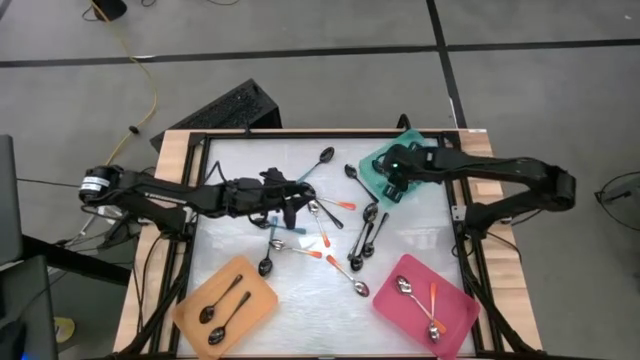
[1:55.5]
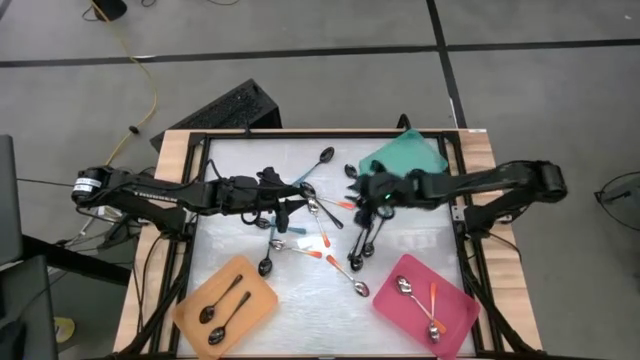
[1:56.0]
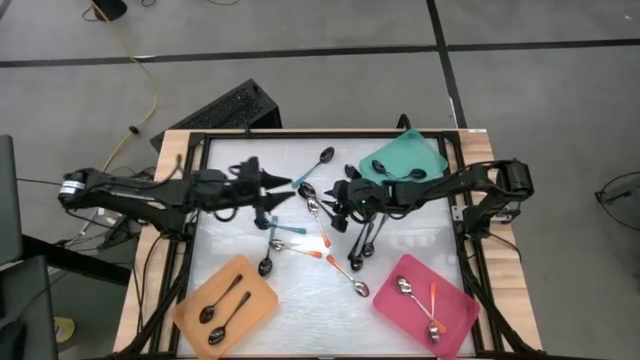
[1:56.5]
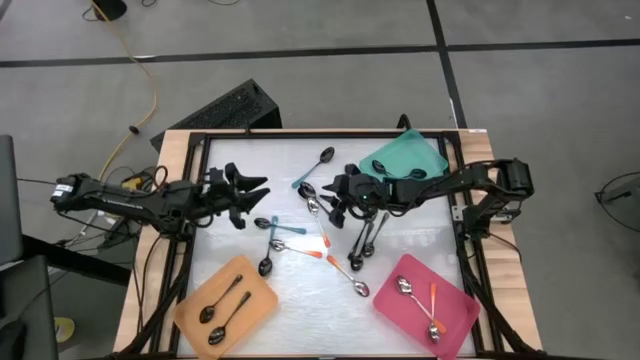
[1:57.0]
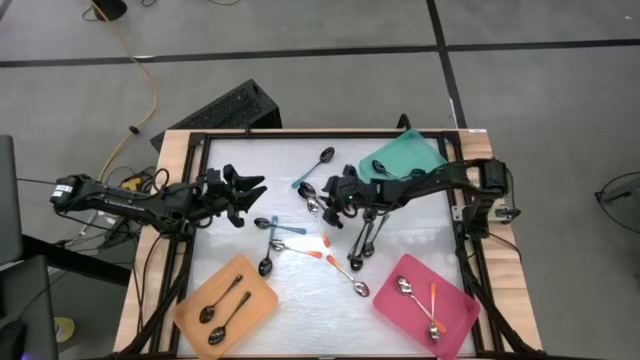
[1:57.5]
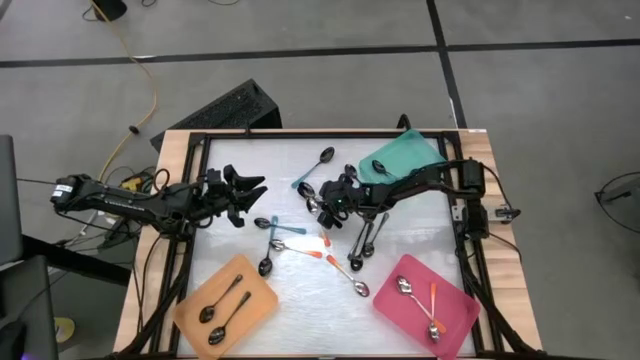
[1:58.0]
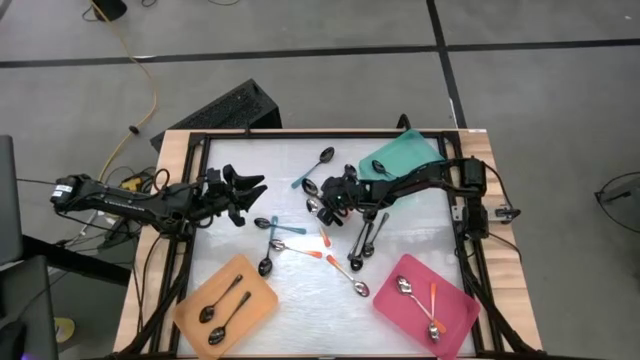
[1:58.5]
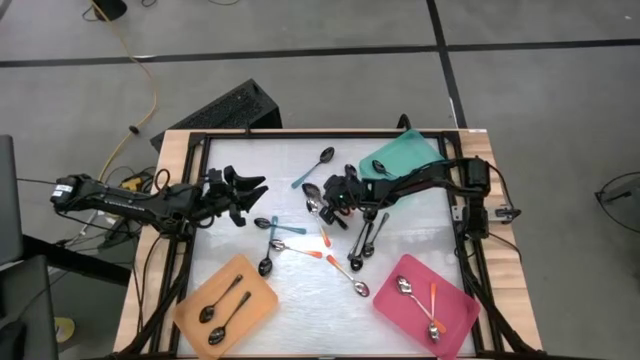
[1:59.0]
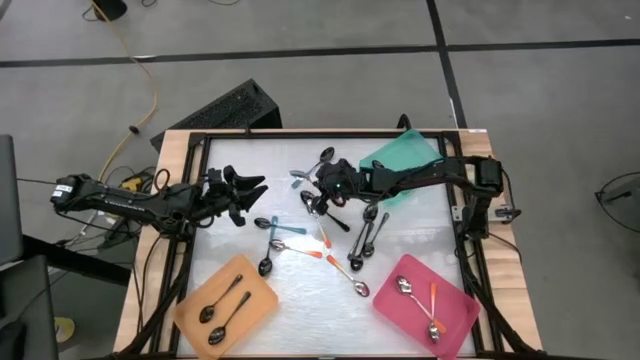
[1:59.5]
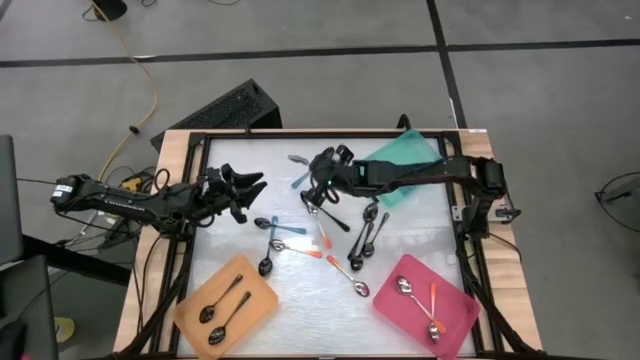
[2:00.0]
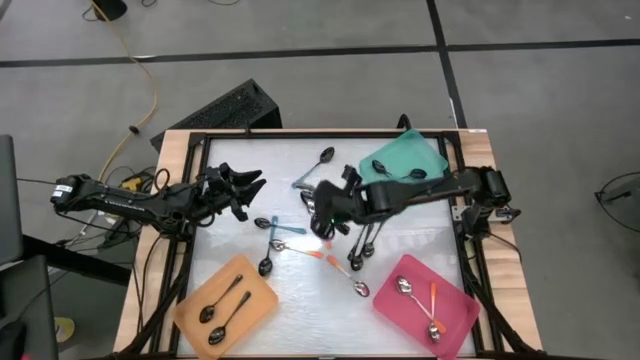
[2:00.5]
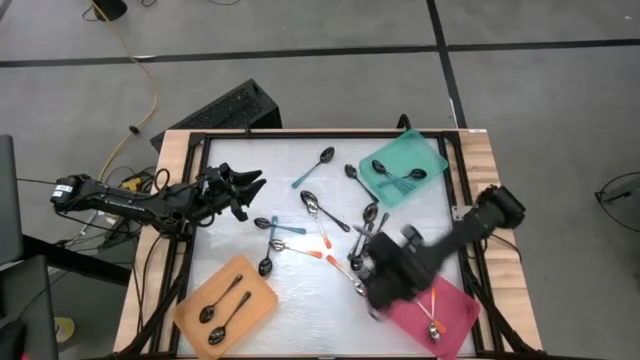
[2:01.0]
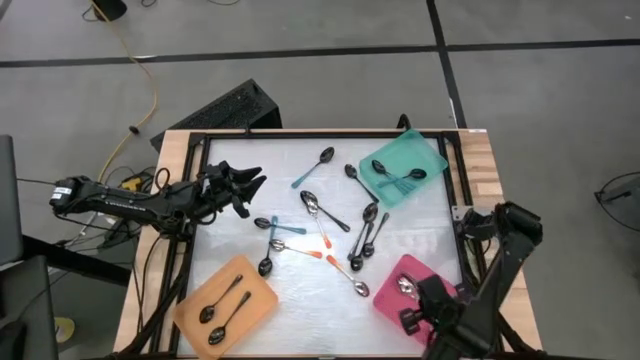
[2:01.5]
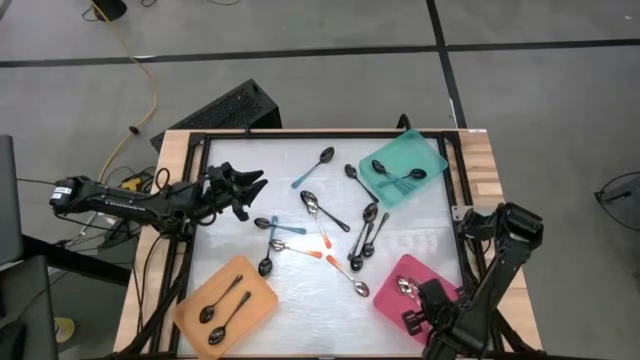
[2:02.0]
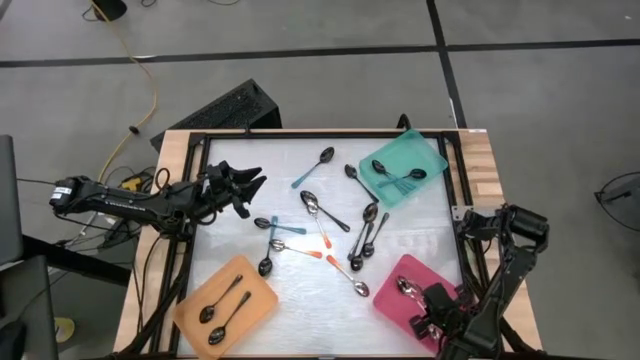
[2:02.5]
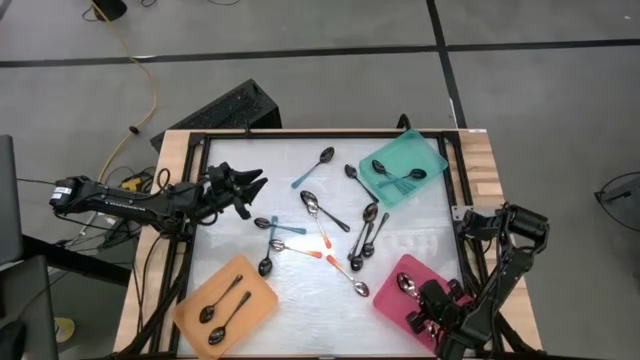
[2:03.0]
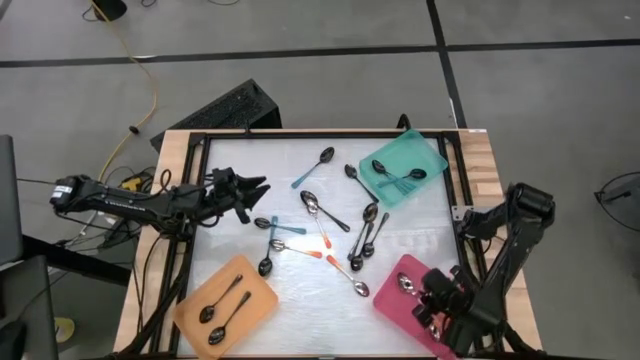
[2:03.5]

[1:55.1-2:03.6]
Task: Sort silverware by color (type)
Put the orange spoon into the red bin

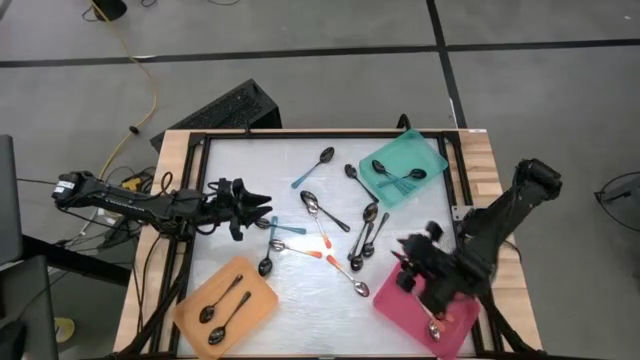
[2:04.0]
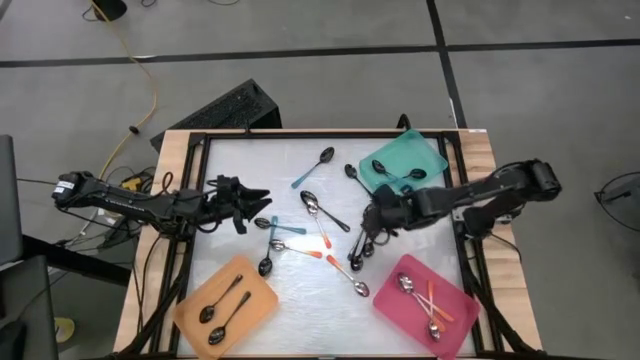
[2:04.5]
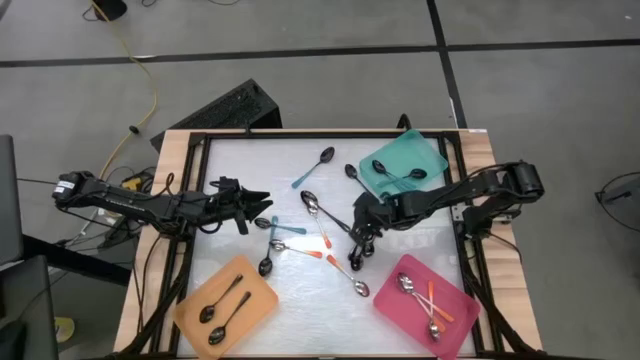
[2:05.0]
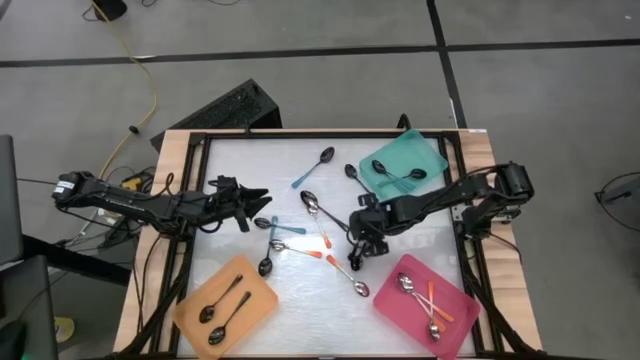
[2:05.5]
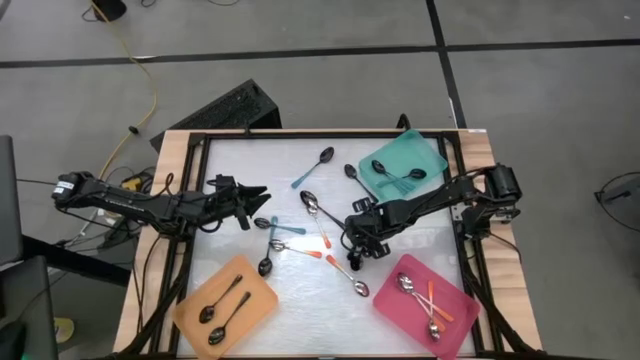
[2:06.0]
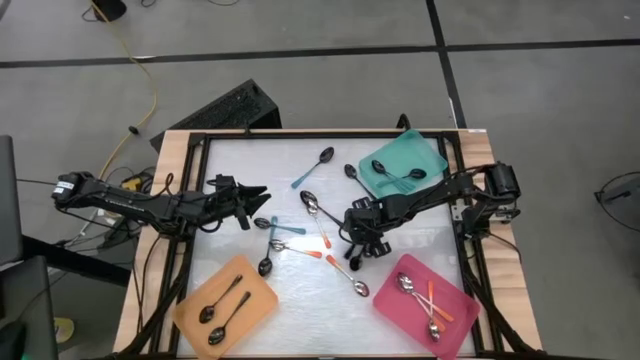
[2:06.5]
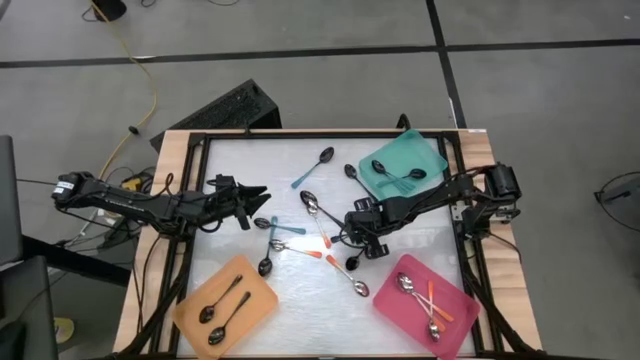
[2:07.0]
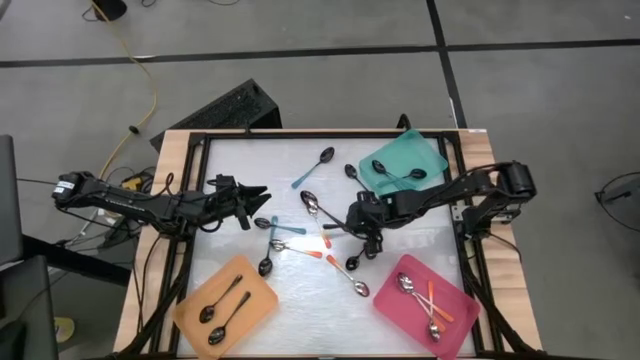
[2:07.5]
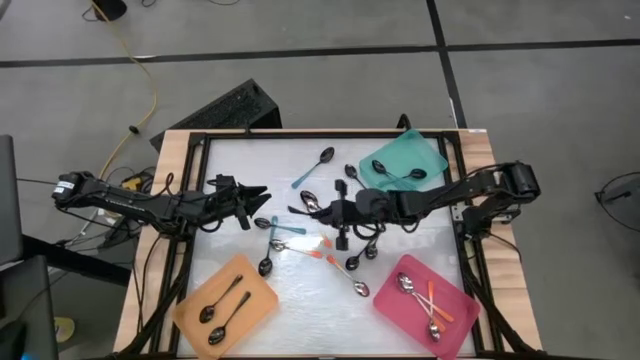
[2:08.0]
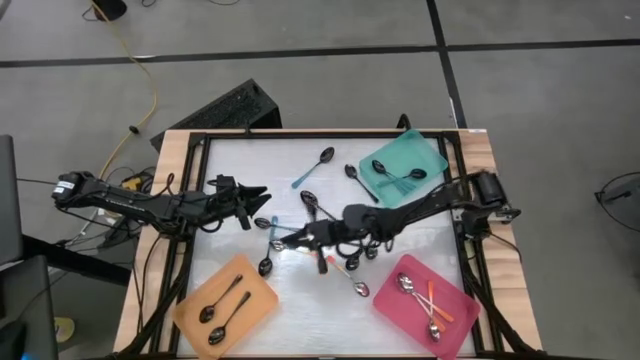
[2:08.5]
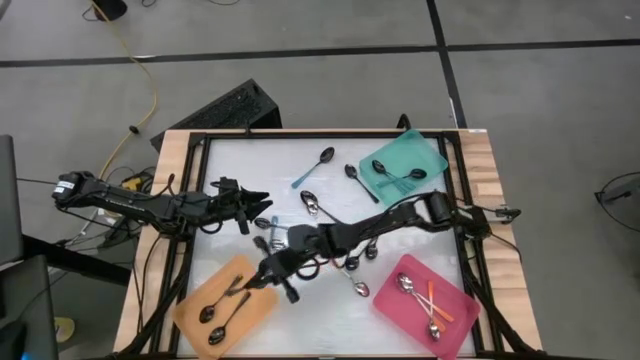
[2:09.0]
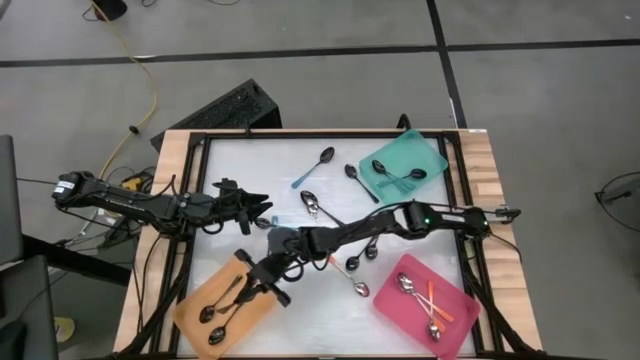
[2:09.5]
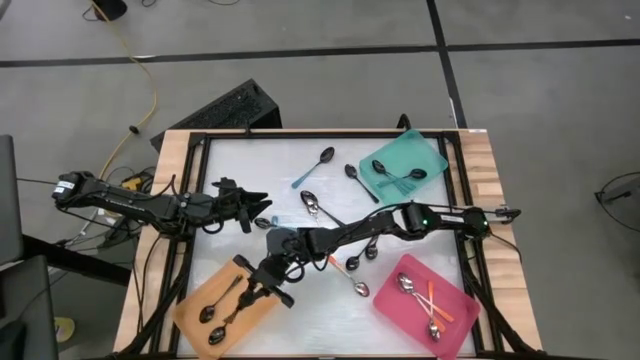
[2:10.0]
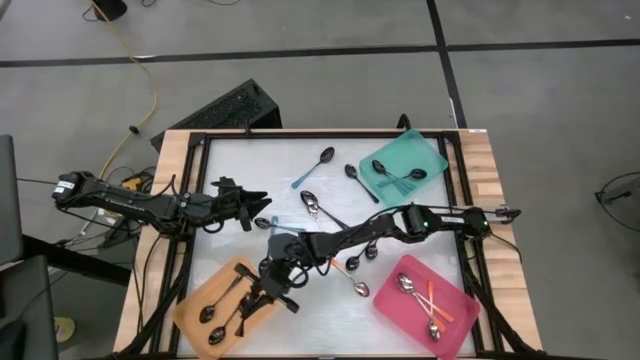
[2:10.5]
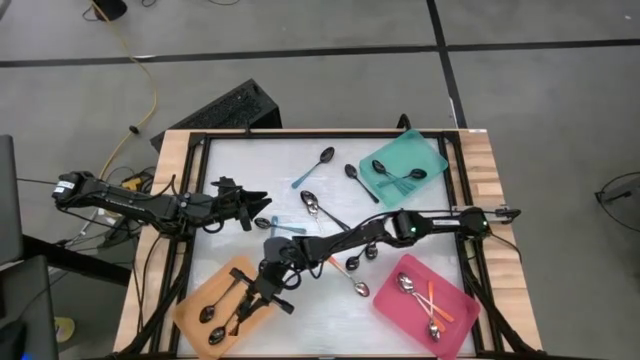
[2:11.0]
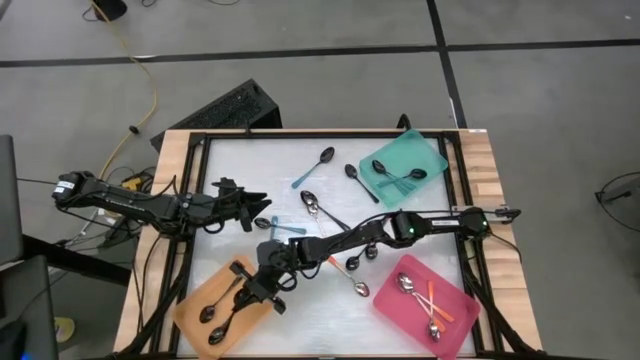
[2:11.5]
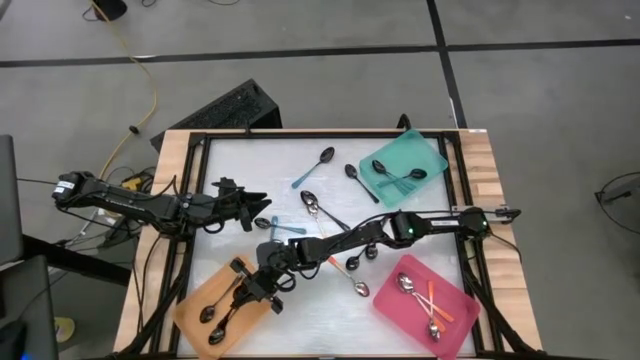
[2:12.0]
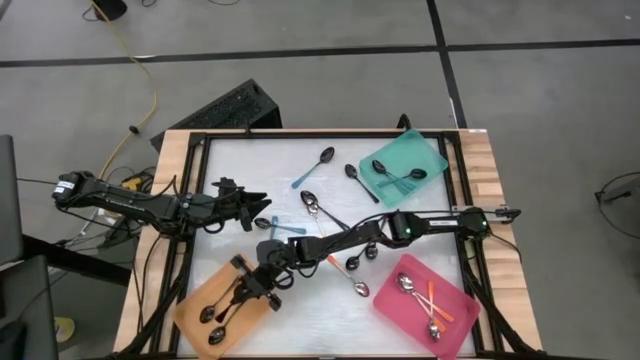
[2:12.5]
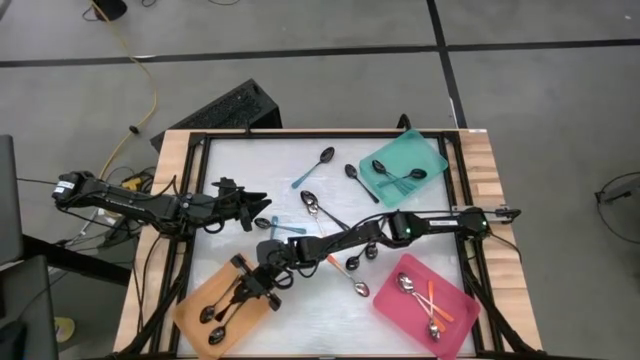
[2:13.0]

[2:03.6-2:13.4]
Put the black spoon into the orange bin

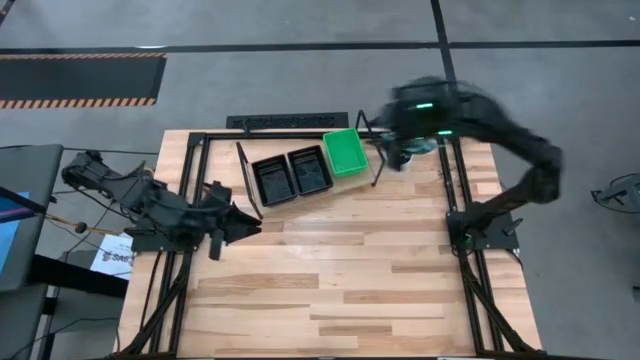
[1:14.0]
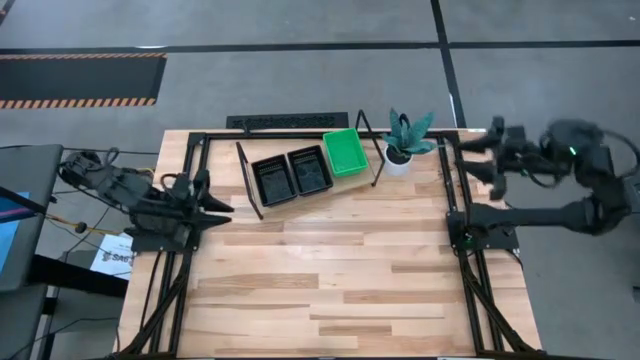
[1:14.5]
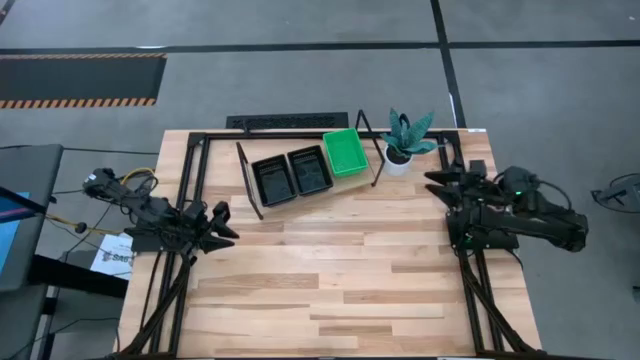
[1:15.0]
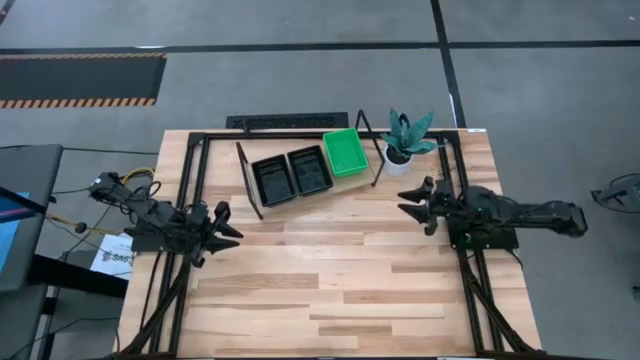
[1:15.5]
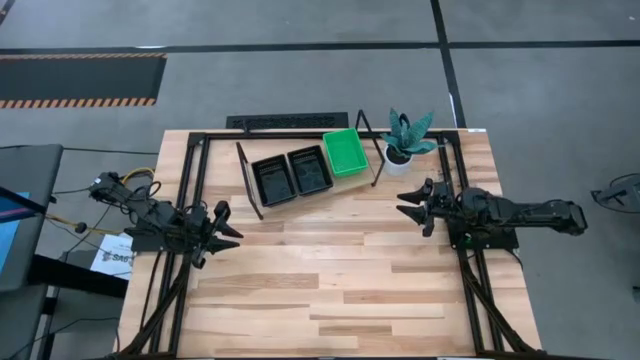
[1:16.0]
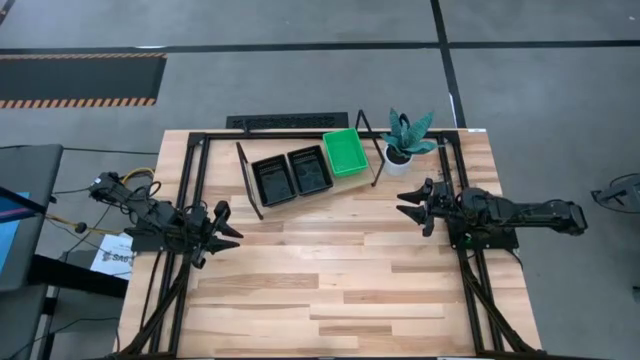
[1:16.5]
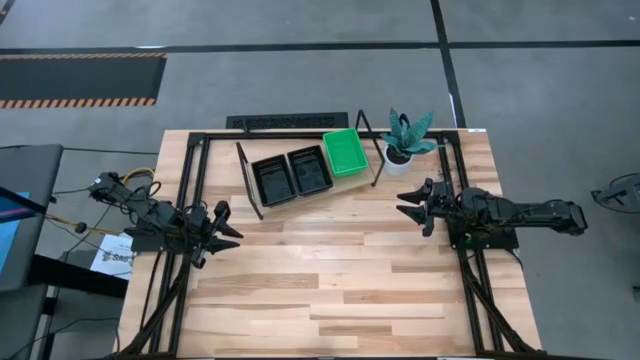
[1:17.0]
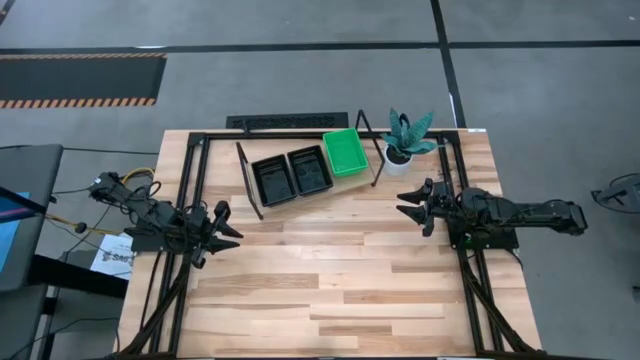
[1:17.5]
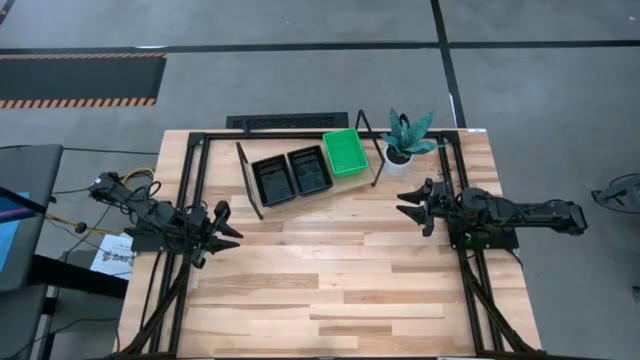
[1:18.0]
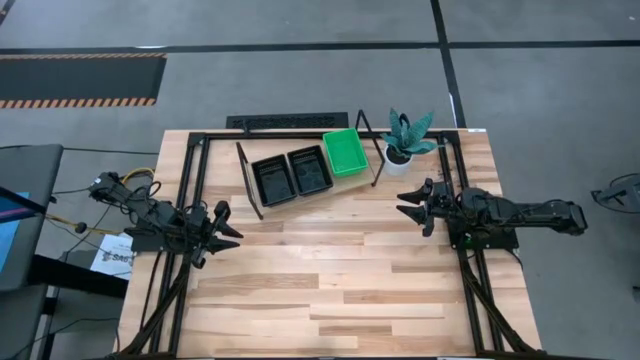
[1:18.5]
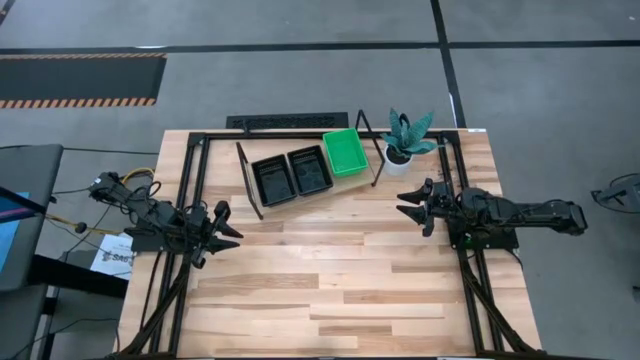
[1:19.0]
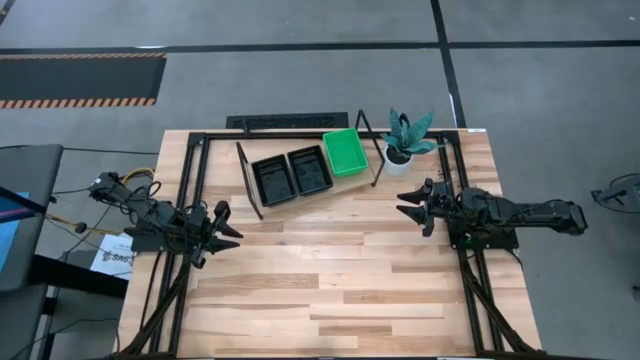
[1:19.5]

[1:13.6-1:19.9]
Task: Stack baskets on shelf by color
Return to Home Position
